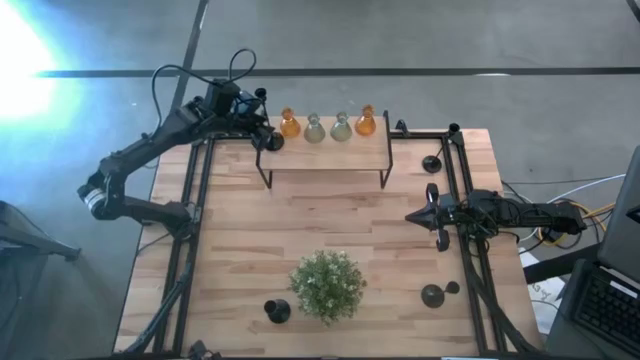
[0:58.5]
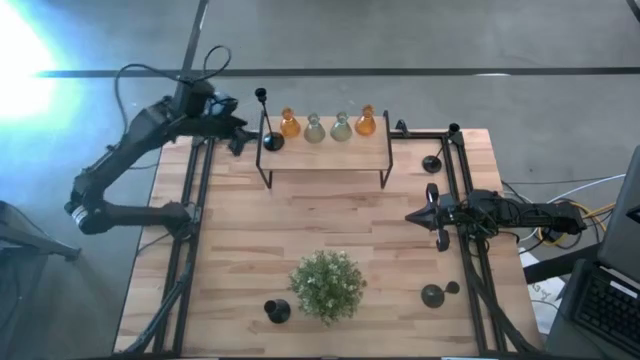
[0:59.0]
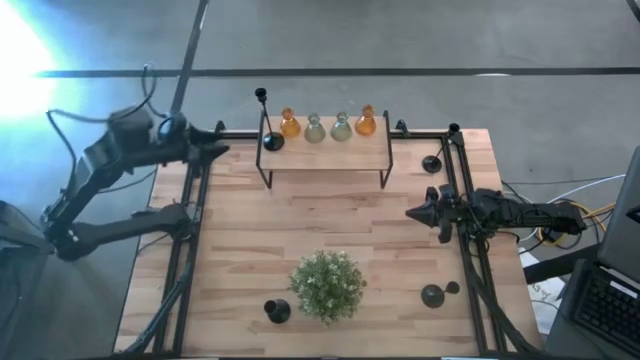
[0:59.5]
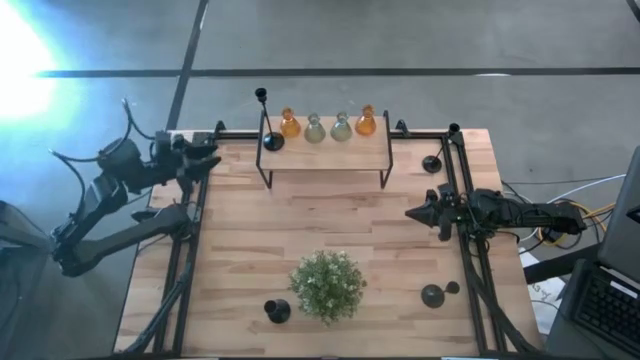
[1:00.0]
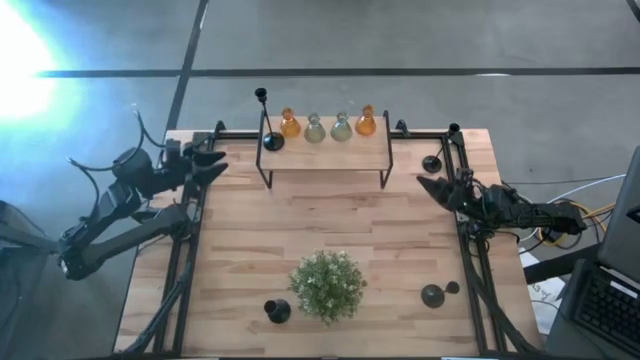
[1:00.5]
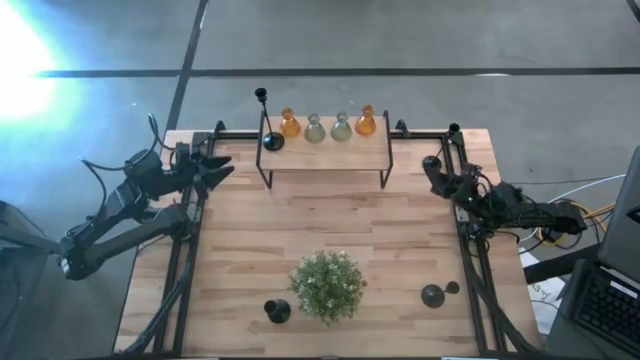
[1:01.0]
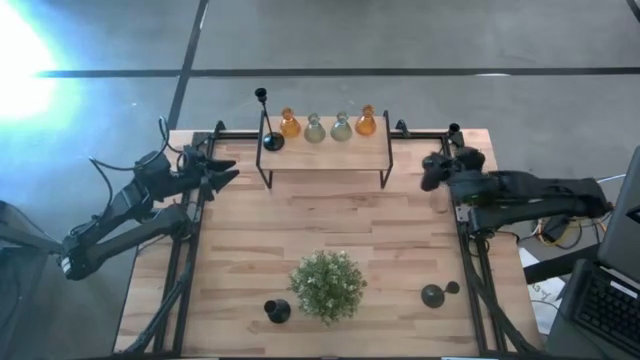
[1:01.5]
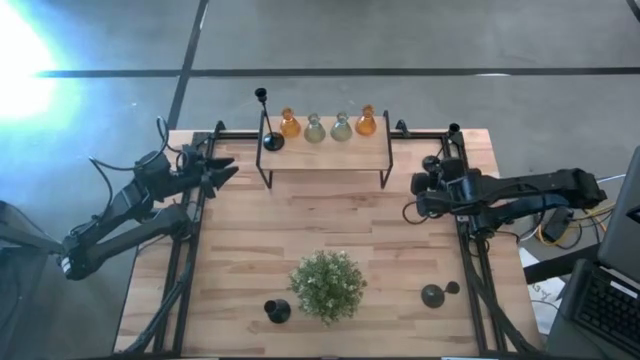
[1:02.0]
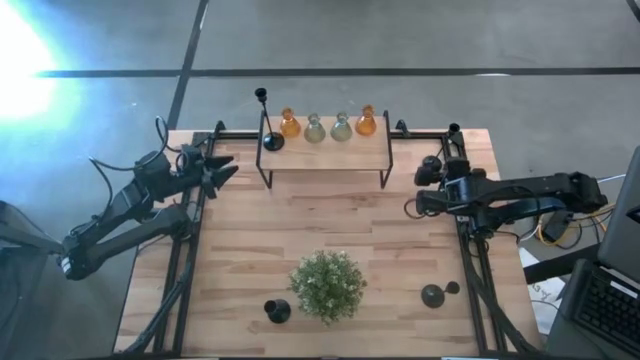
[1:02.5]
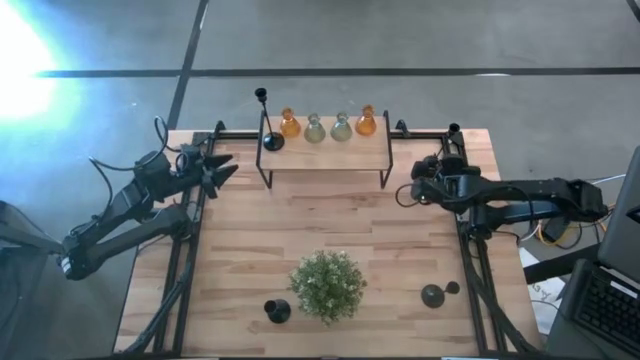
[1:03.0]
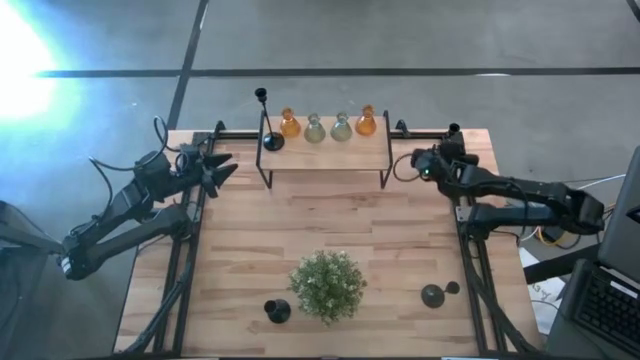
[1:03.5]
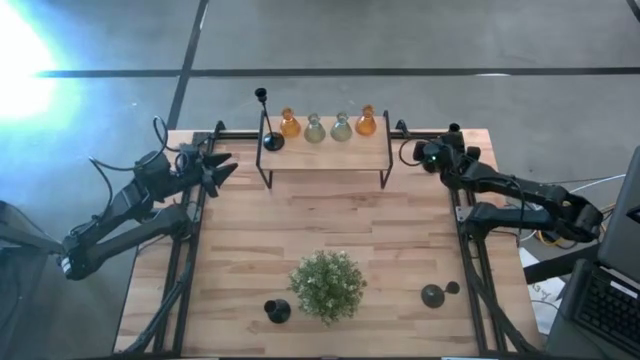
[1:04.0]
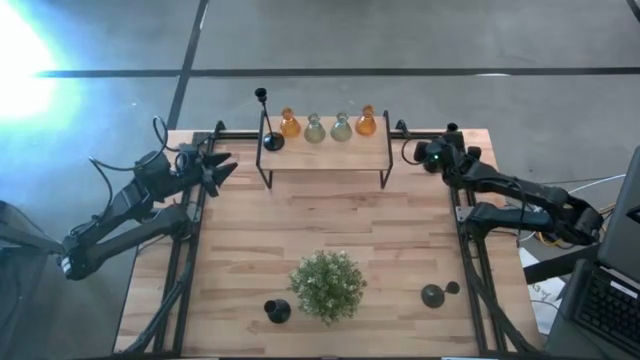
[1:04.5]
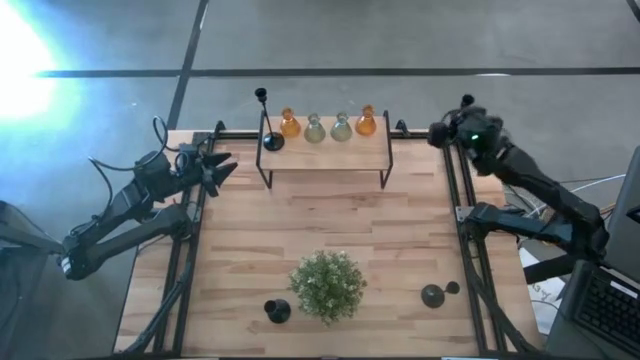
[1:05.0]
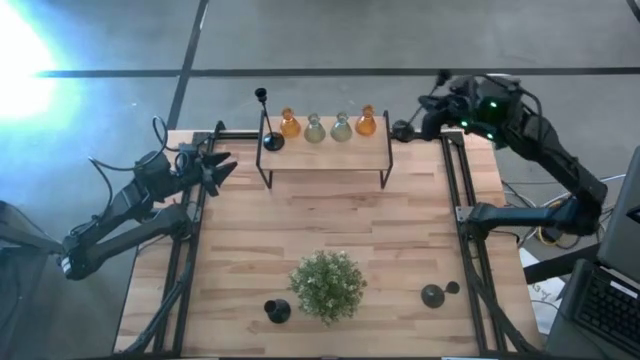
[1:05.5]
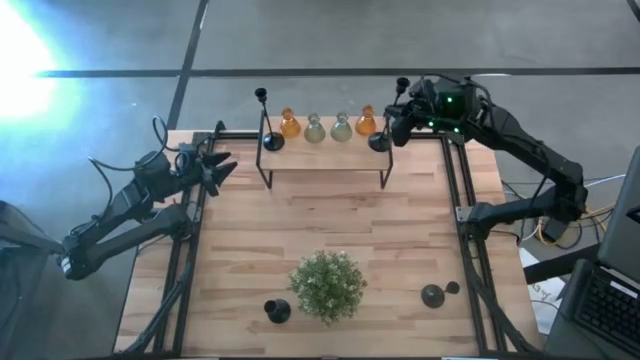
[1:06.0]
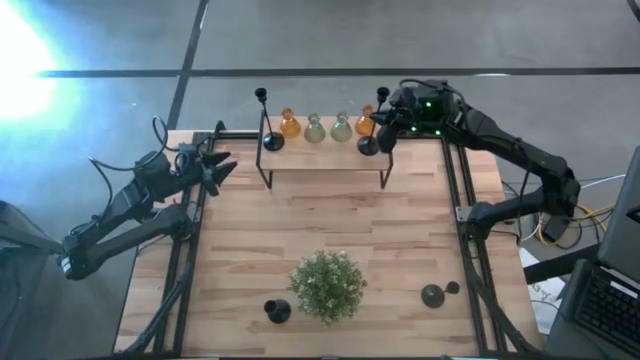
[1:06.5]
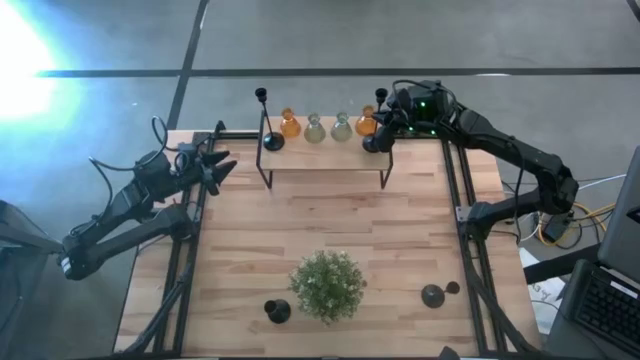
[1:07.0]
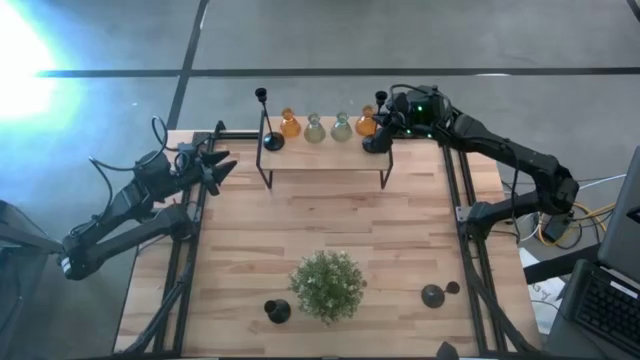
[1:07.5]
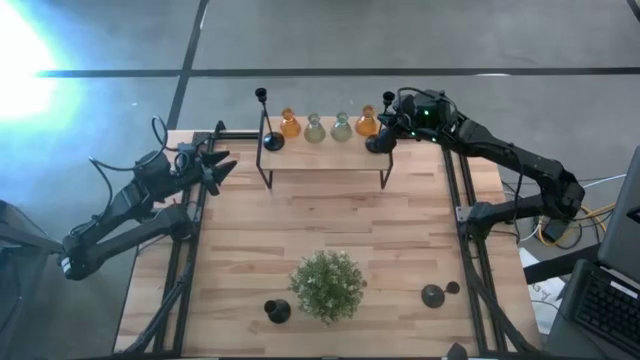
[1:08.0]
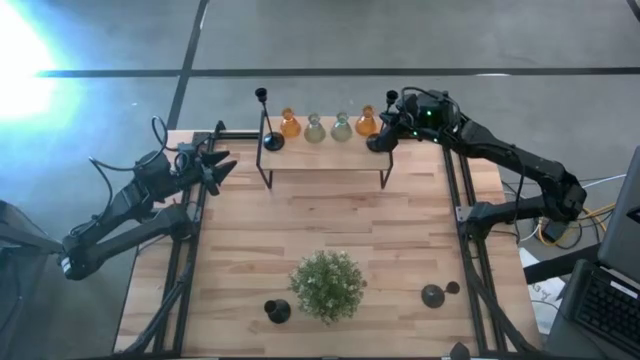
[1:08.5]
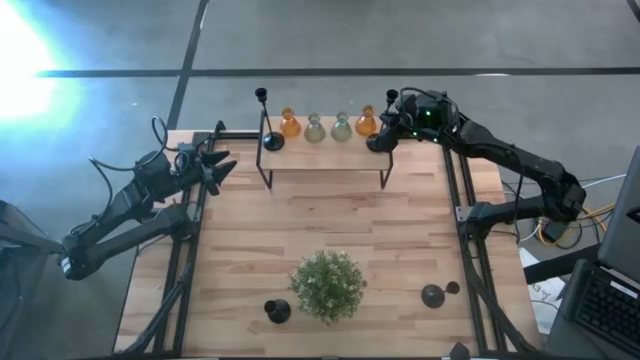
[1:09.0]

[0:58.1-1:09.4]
Task: Pick & Place candle stick holders
Put the black candle holder on the shelf

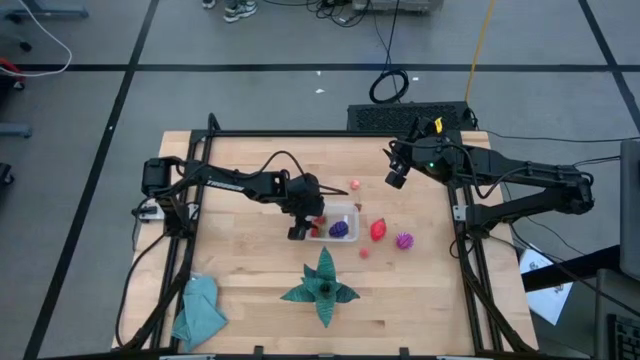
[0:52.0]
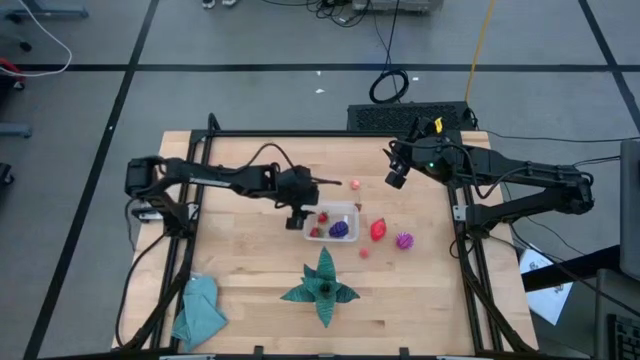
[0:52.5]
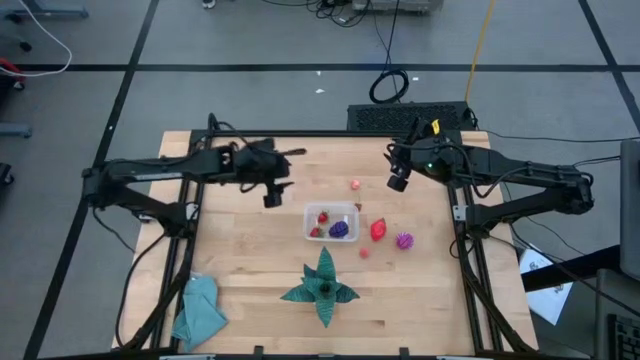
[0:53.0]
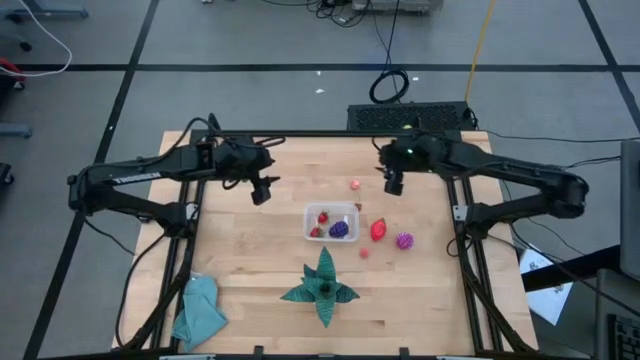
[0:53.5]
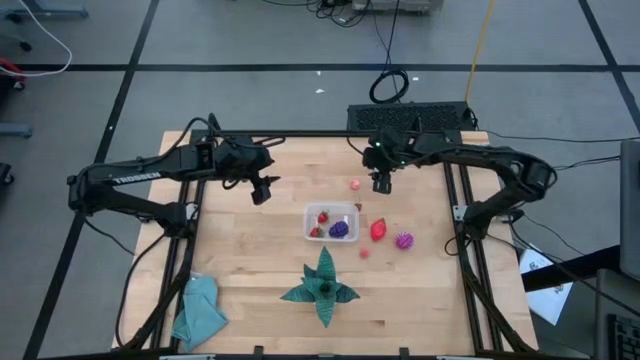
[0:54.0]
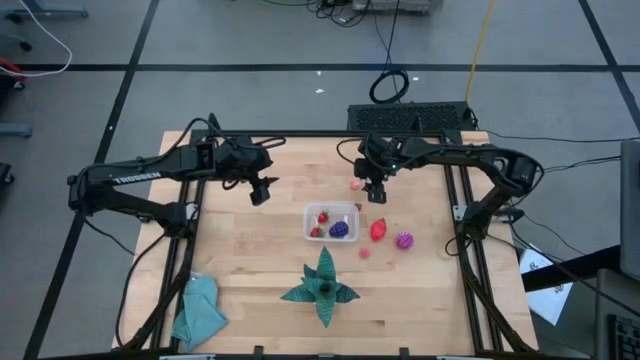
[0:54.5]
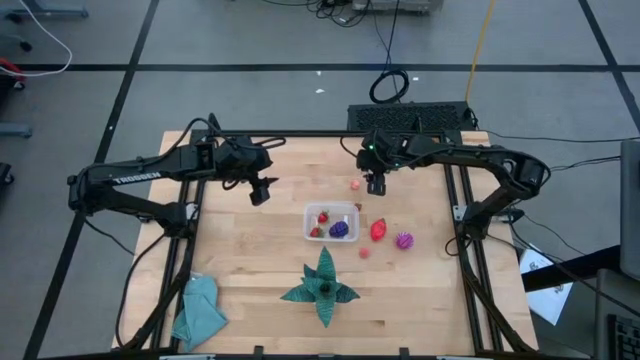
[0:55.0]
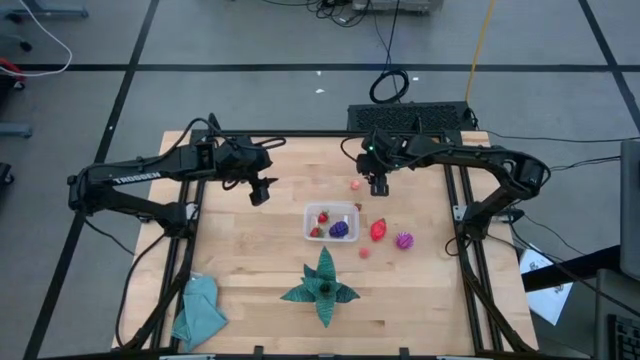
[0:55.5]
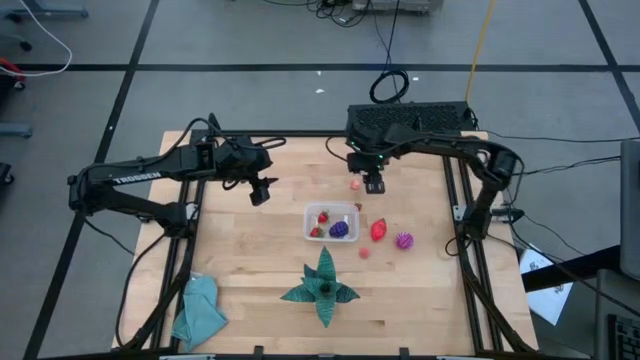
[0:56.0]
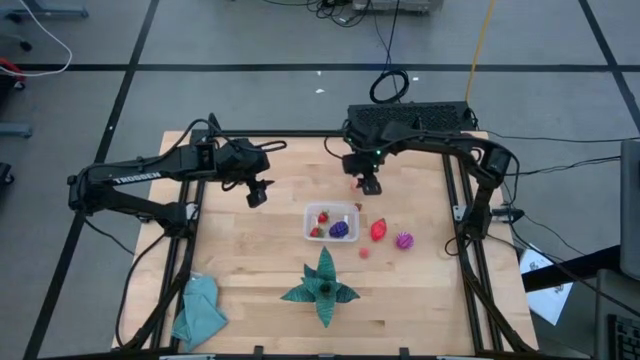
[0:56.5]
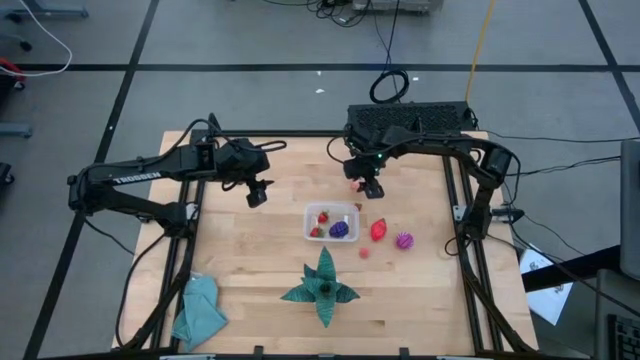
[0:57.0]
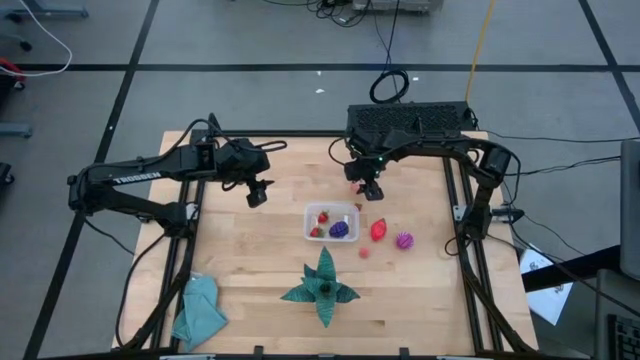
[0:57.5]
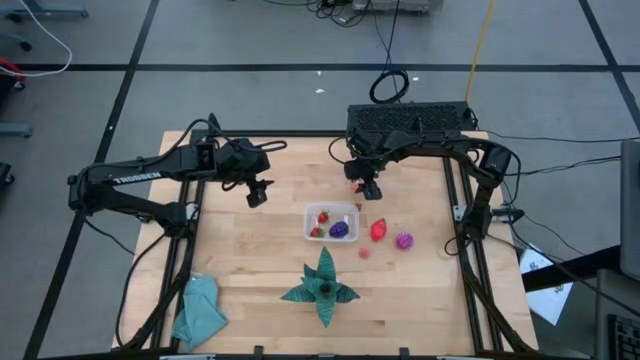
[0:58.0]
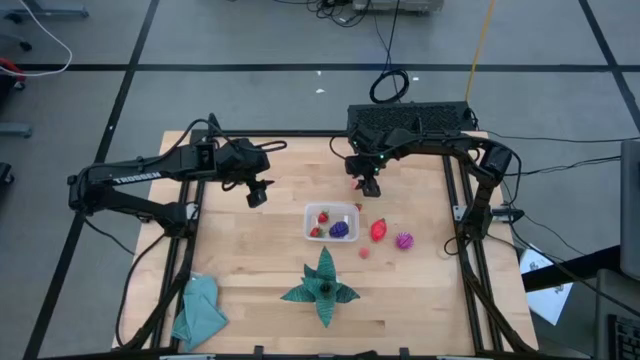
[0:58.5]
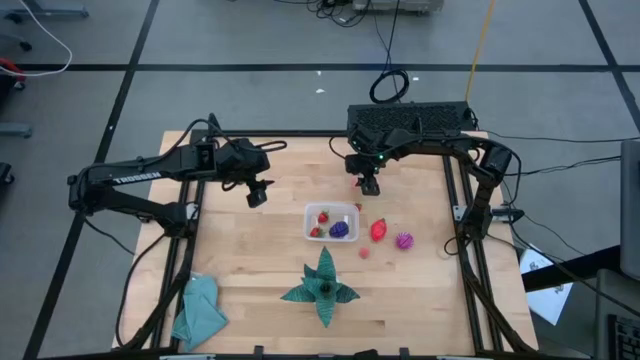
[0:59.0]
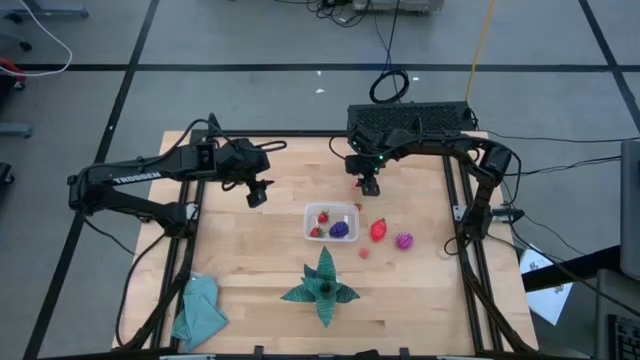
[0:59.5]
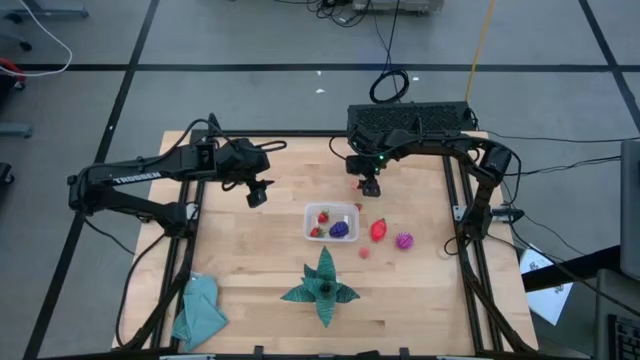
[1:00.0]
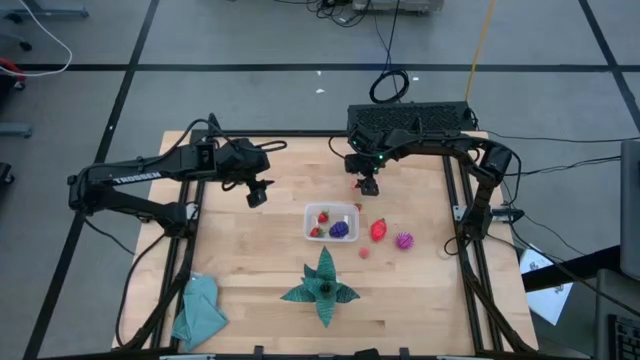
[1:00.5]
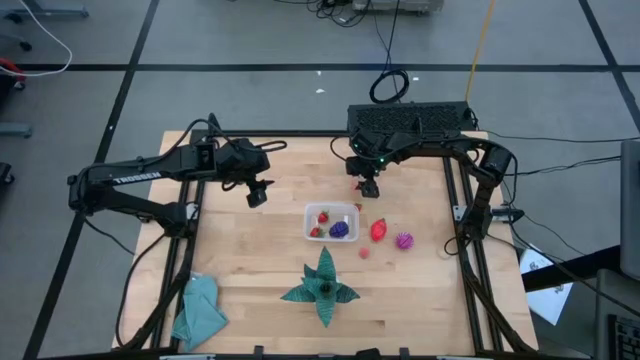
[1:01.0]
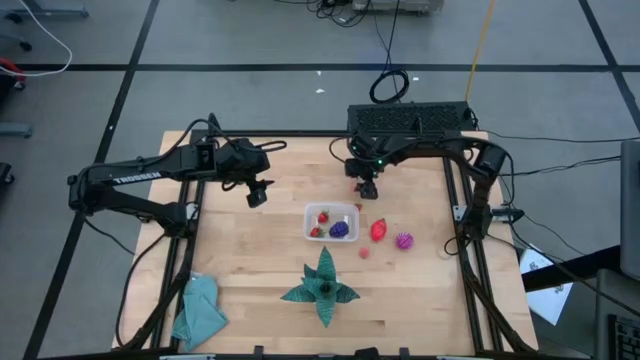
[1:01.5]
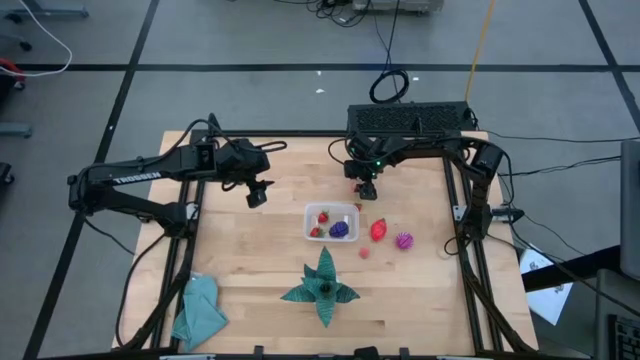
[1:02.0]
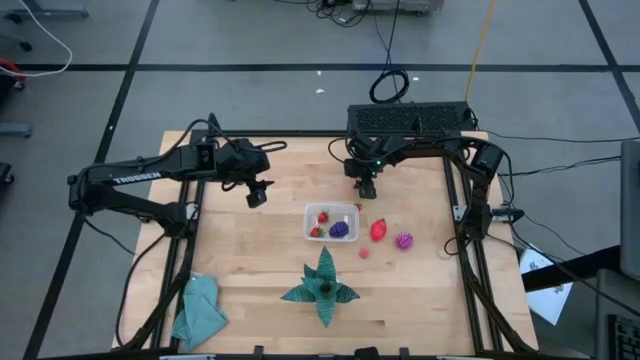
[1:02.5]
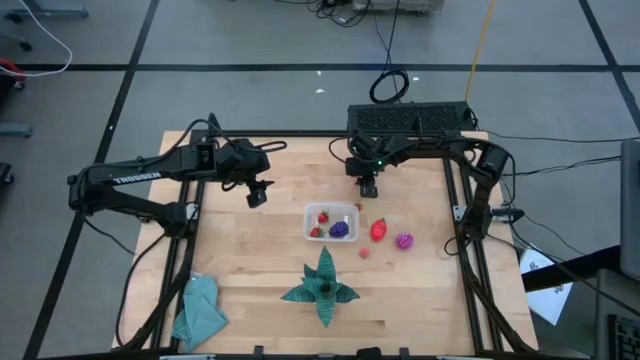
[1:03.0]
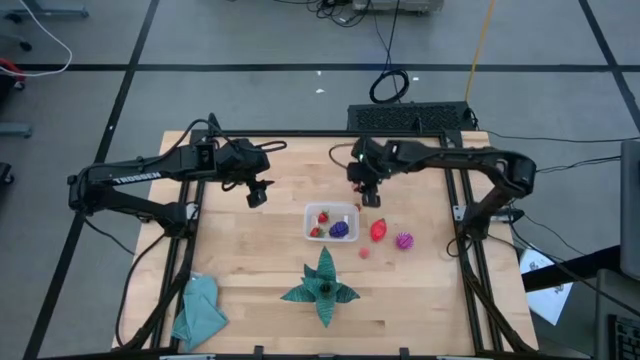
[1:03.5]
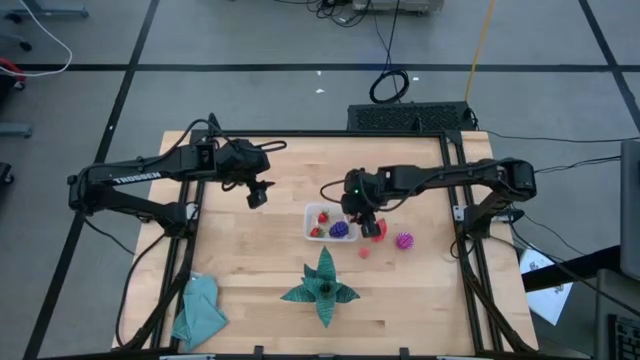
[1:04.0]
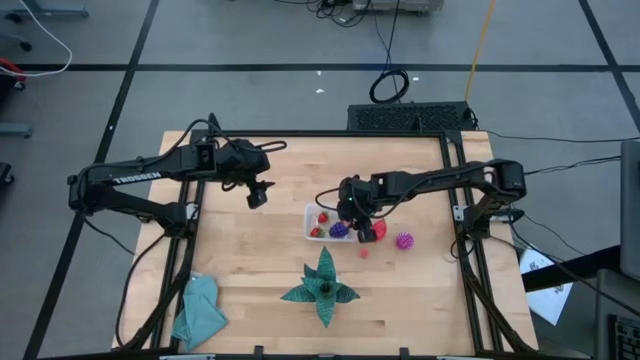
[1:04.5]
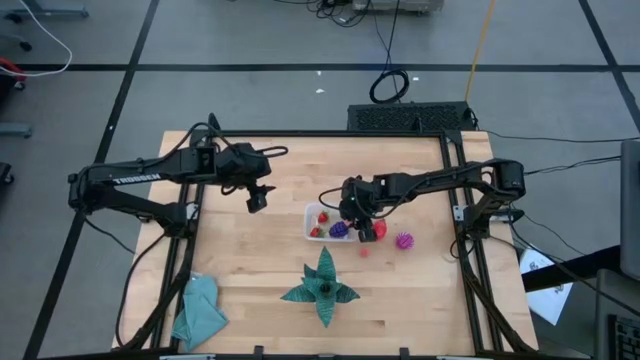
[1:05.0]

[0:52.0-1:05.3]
Task: Pick and placing Produce into tupperware
Put the pink peach into the transparent bin
